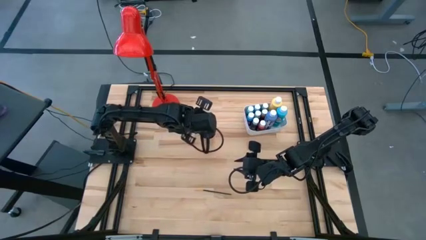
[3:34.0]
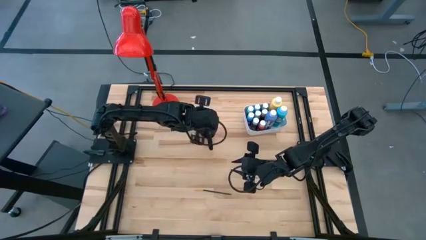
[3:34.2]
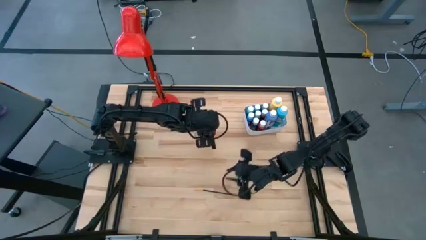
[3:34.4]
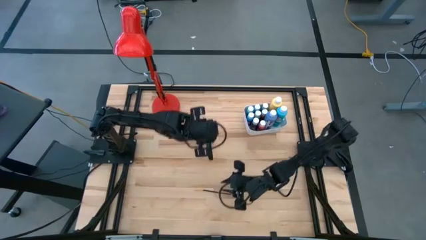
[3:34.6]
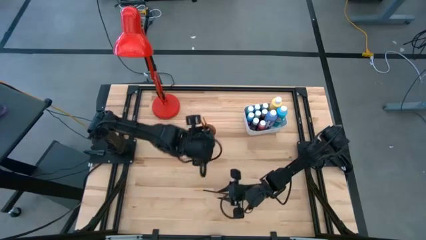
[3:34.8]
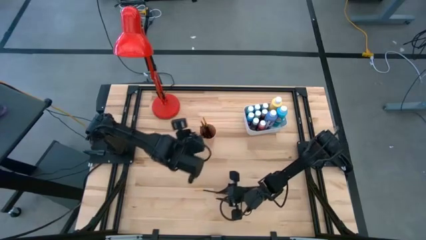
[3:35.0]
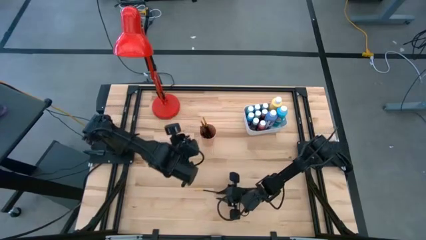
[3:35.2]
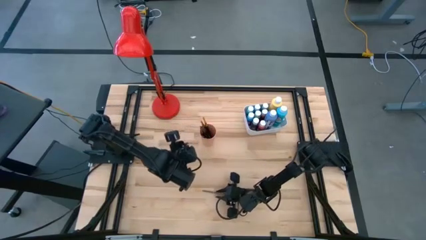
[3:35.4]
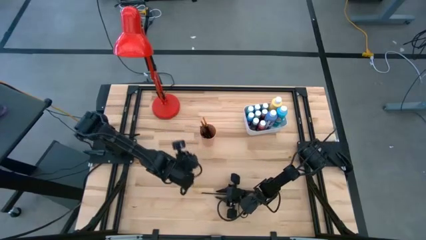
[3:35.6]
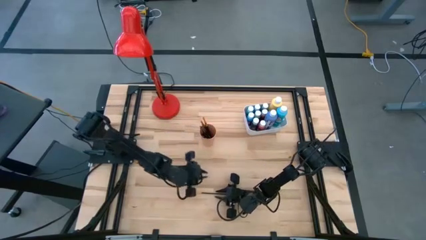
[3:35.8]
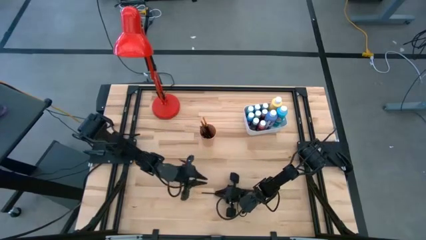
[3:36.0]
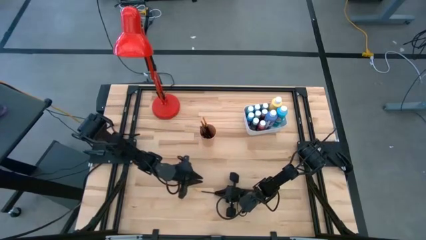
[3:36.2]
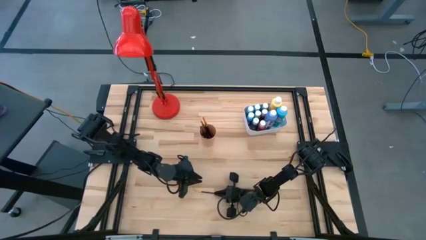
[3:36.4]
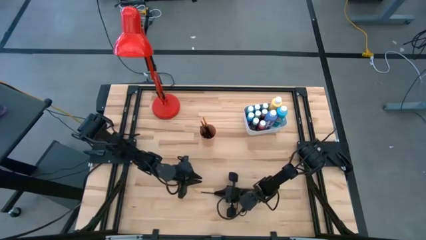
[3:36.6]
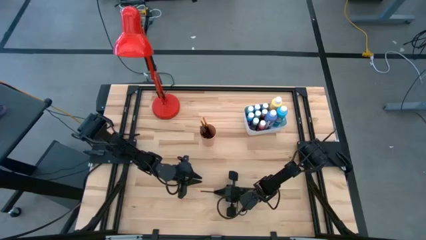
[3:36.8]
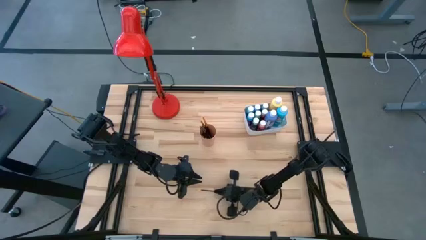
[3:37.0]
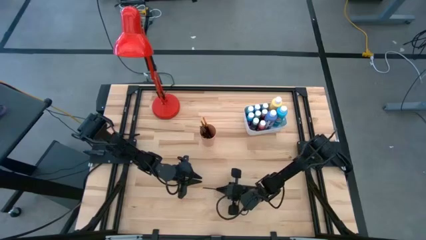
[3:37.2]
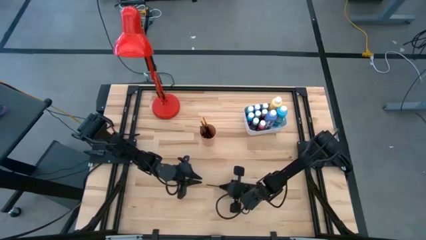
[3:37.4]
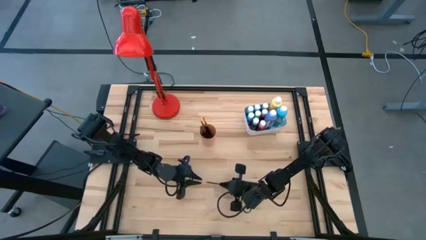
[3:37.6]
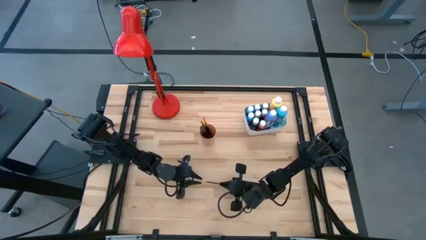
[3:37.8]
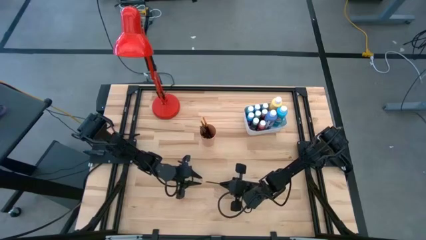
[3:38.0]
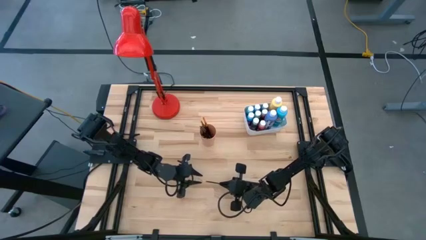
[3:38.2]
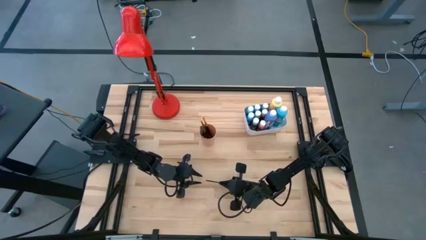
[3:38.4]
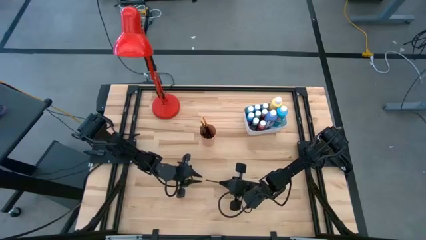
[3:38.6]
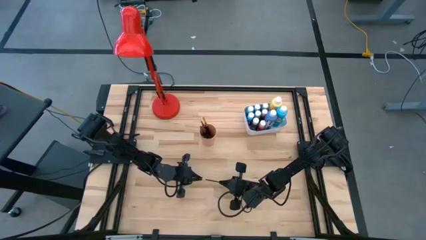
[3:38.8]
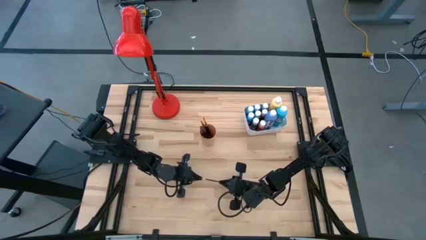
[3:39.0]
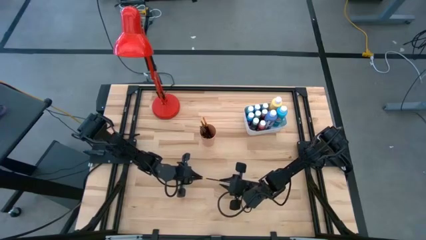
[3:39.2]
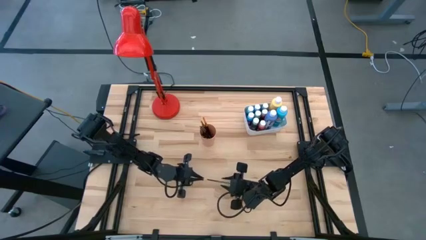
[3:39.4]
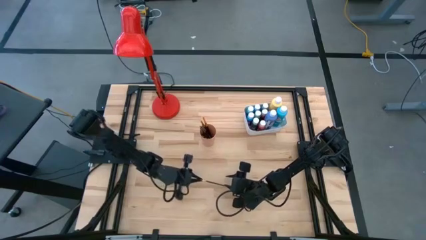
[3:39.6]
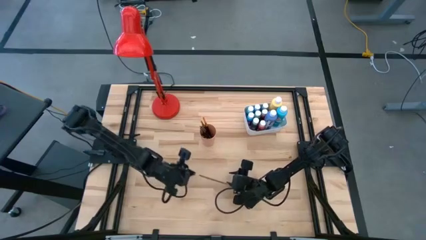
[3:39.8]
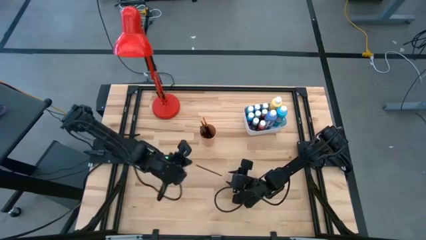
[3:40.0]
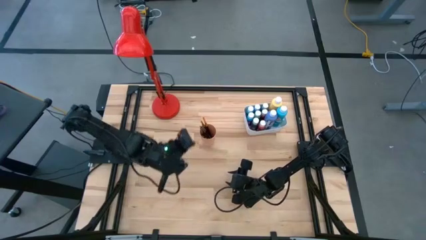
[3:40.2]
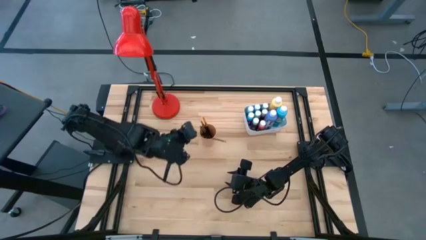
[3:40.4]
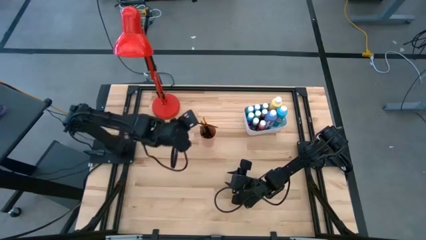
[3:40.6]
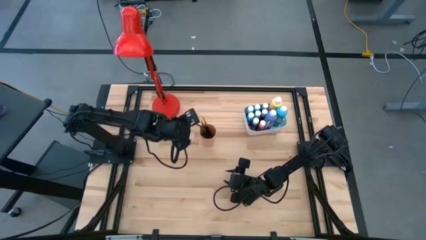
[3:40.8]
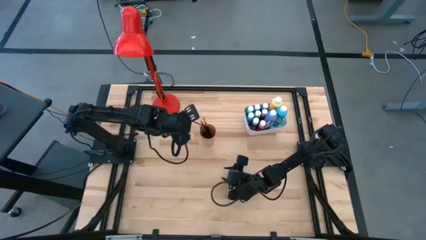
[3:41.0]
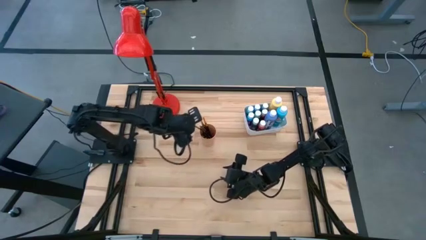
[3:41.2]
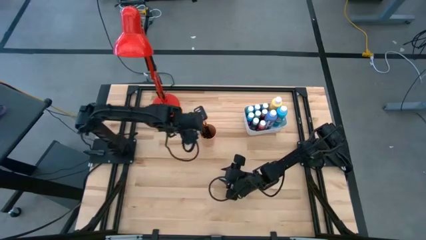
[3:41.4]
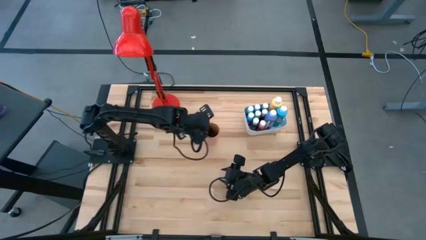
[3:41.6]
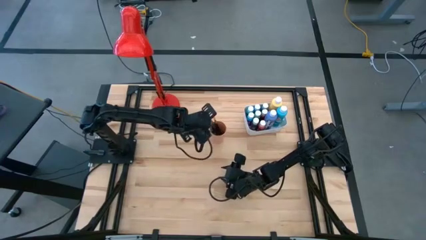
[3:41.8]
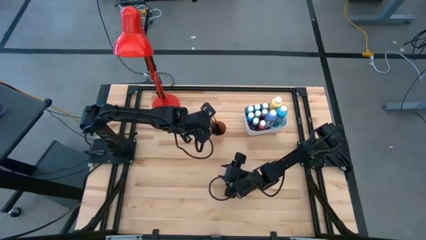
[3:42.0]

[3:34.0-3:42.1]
Task: Pick & Place Paint Supplies
Put the orange paint brush into the orange cup

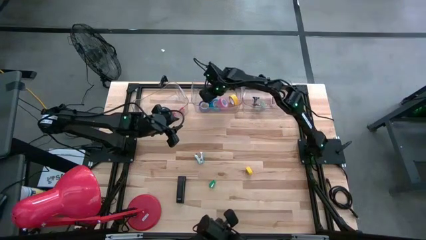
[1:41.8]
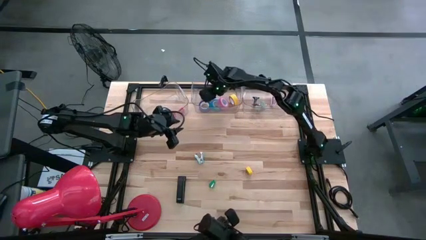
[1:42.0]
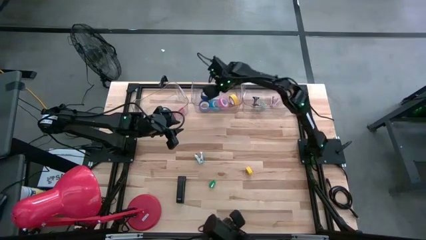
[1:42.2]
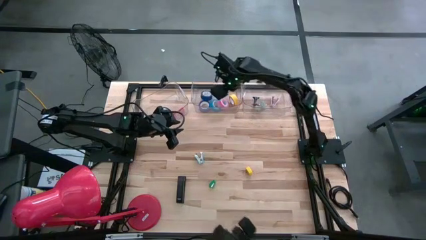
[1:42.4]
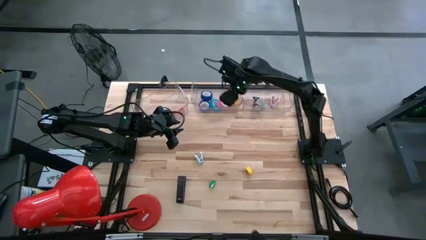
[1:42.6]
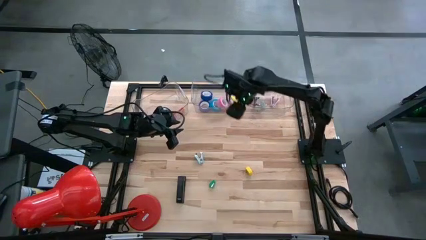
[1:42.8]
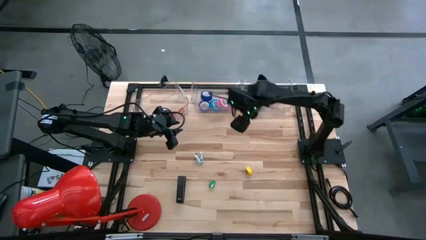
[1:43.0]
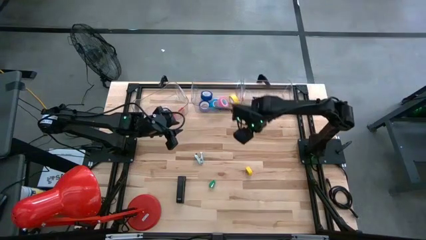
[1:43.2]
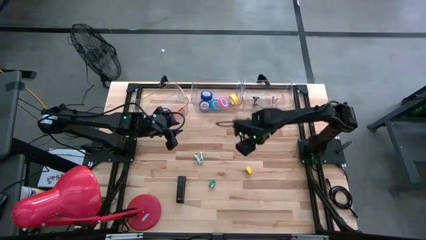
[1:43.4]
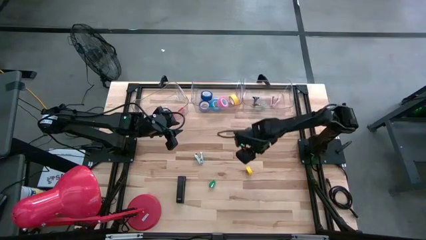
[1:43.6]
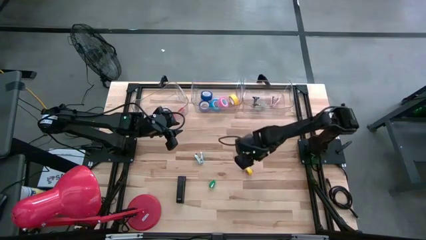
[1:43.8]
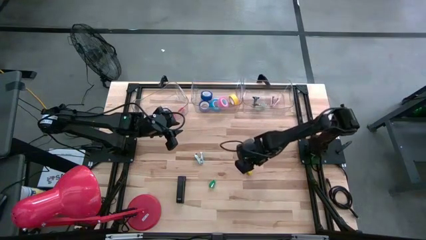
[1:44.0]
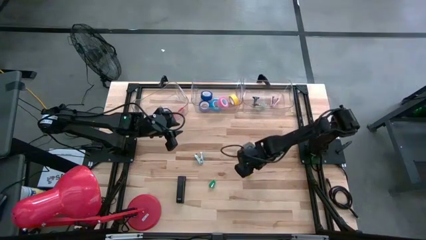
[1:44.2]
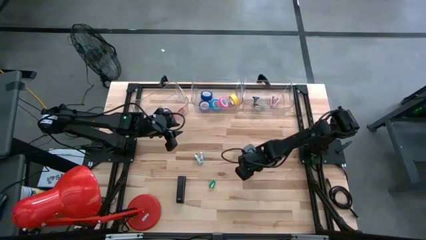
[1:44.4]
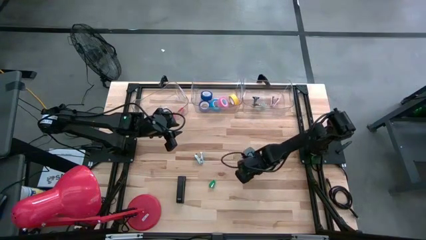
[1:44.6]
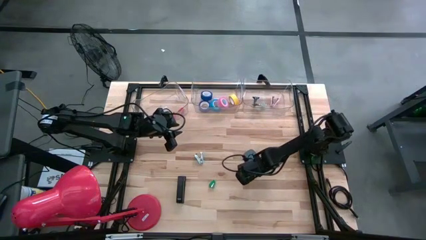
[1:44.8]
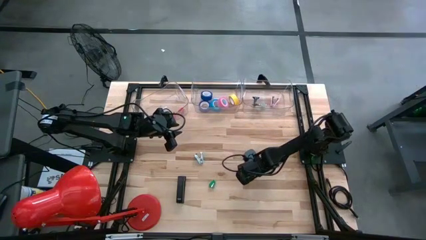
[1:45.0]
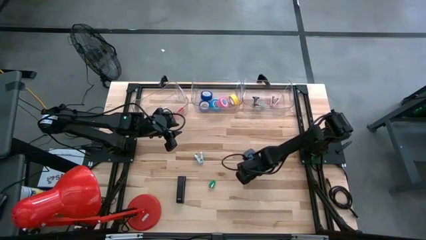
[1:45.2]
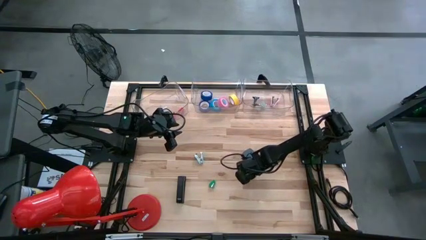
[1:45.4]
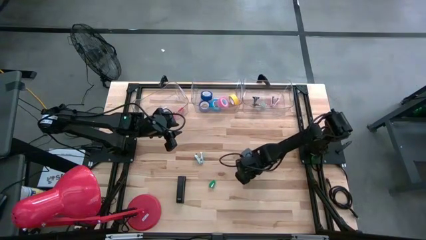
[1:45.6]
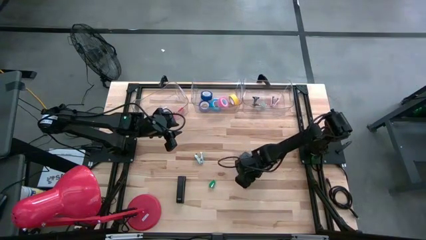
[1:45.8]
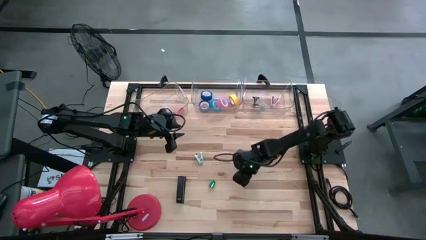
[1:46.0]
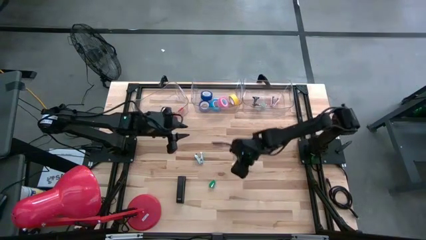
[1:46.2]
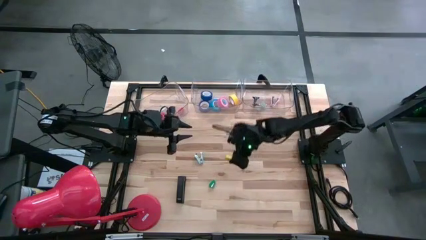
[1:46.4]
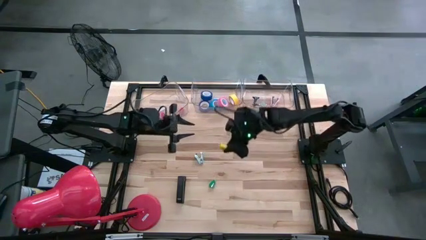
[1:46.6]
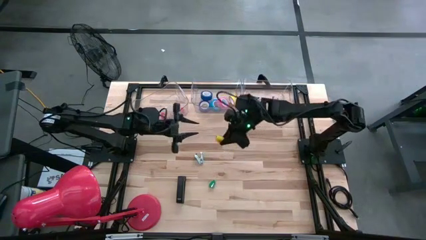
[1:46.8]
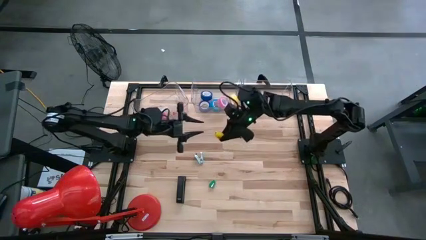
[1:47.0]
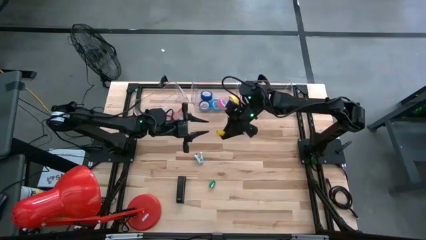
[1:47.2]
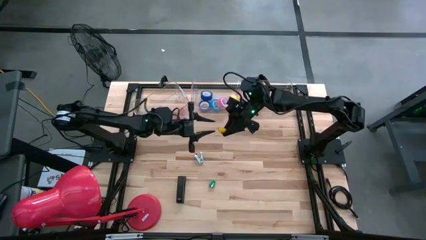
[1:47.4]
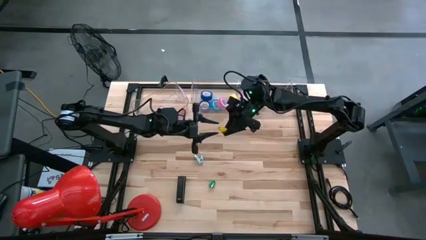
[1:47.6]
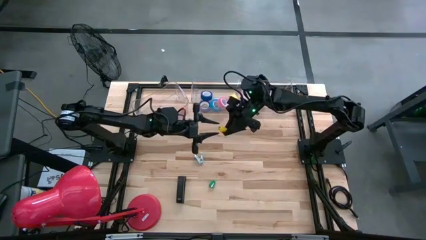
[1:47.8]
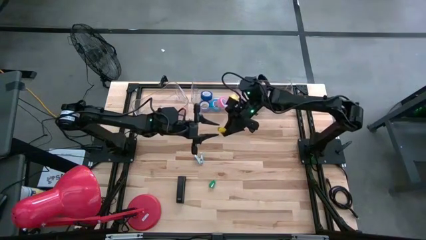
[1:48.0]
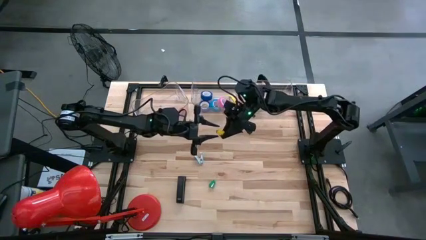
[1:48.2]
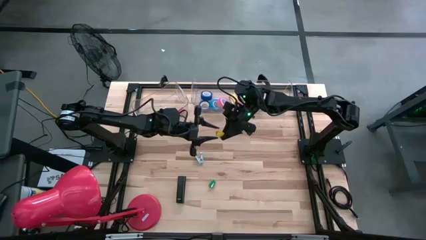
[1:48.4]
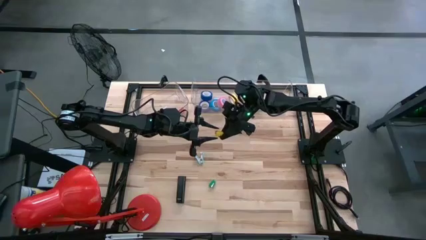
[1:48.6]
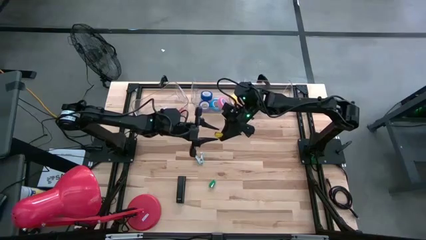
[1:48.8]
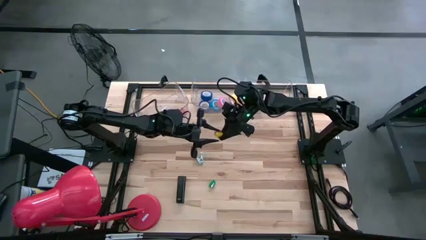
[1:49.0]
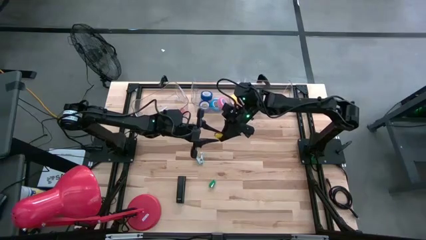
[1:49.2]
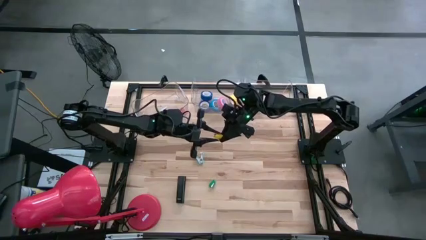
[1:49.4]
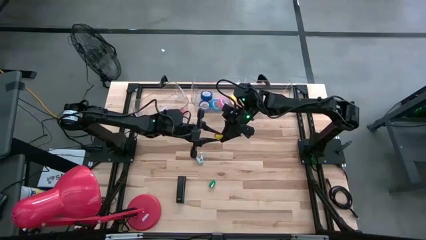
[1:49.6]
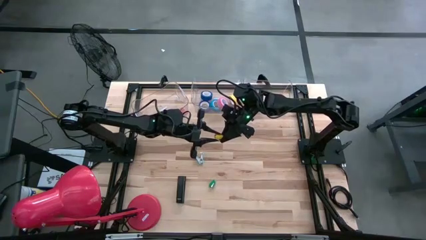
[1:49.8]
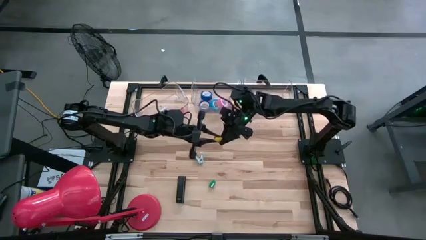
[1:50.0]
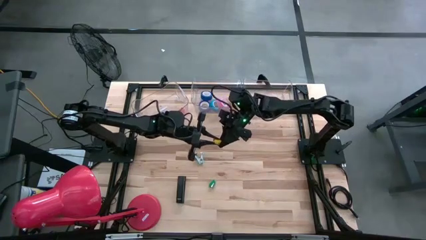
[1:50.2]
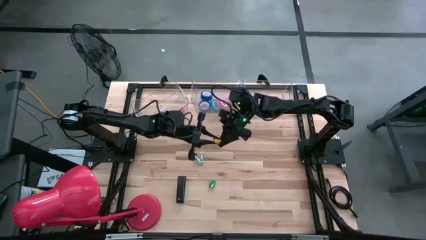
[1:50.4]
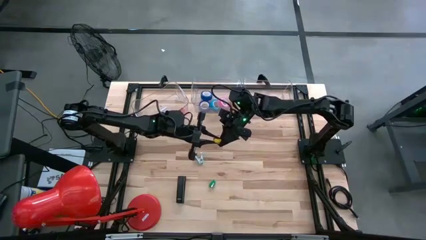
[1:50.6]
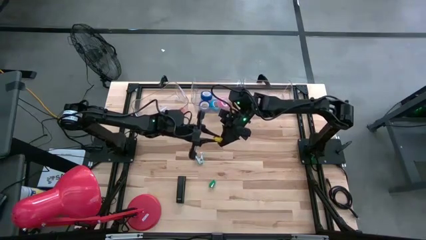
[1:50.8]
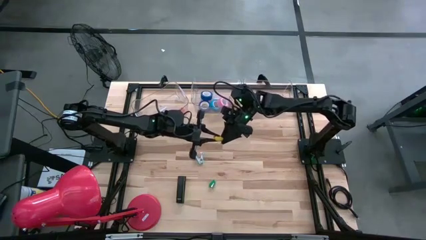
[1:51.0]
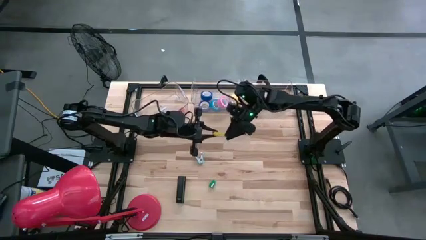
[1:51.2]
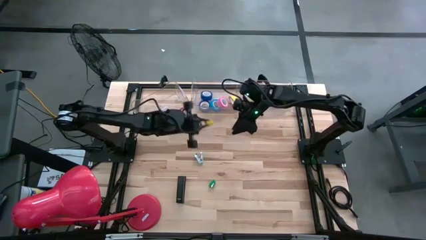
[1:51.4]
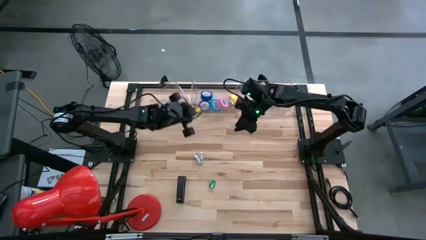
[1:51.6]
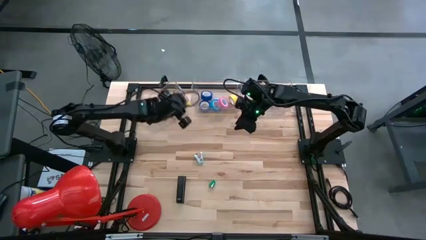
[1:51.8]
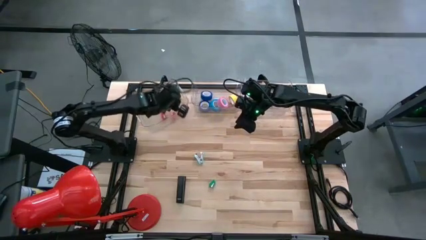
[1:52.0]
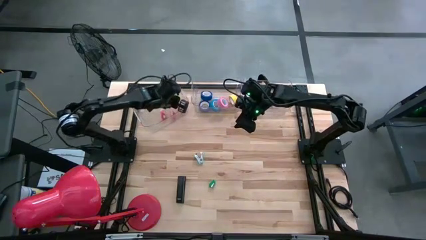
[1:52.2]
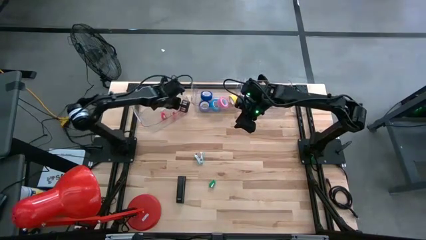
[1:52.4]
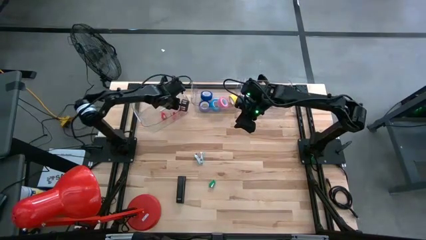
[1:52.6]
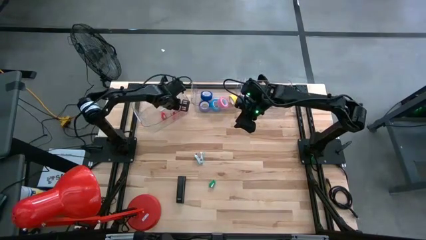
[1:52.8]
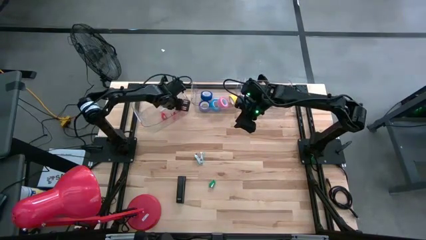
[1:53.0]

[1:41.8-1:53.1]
Task: Pick and place Stapler, Stapler remover, tape
Put the yellow stapler into the left transparent bin
